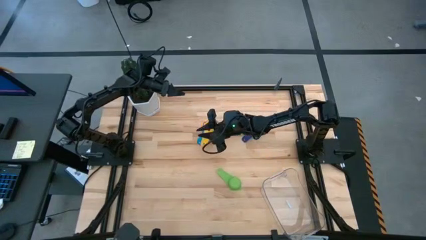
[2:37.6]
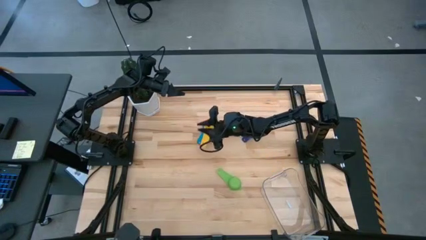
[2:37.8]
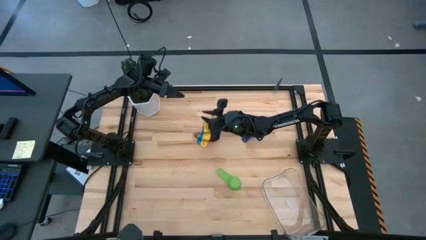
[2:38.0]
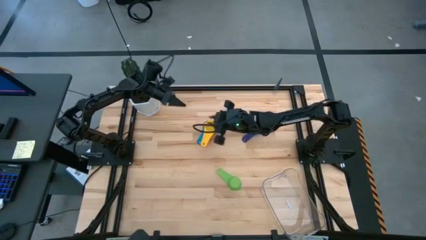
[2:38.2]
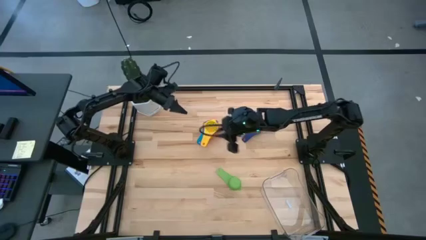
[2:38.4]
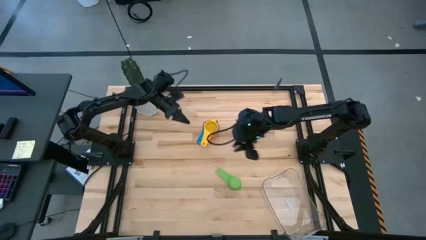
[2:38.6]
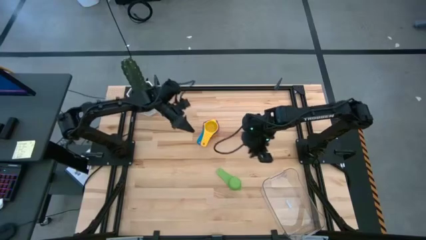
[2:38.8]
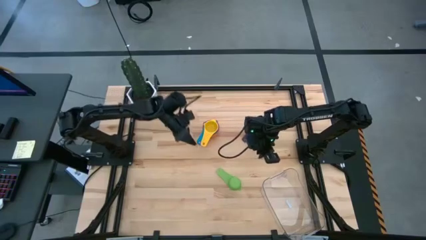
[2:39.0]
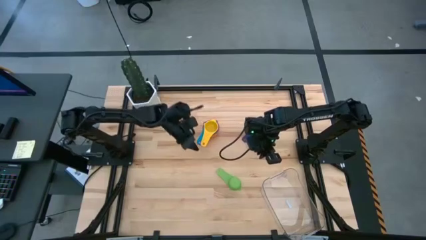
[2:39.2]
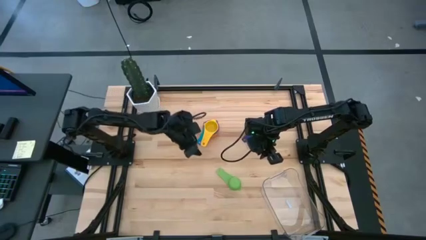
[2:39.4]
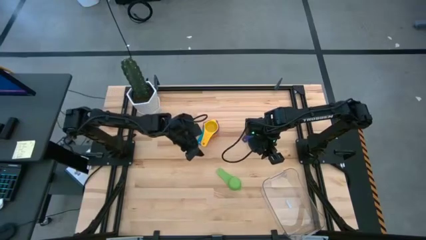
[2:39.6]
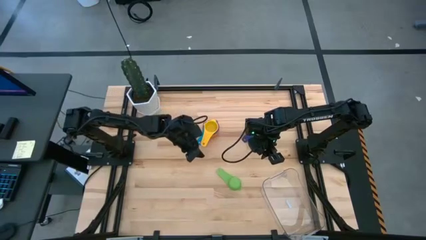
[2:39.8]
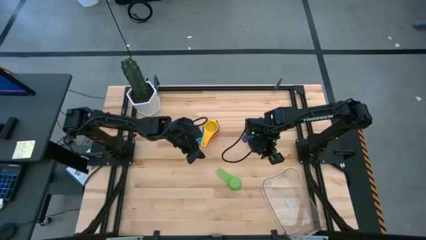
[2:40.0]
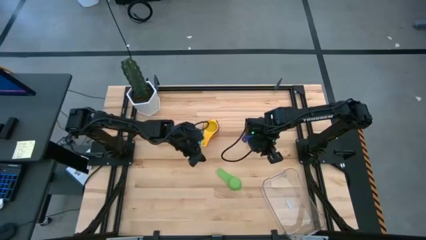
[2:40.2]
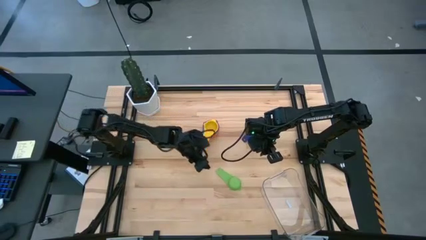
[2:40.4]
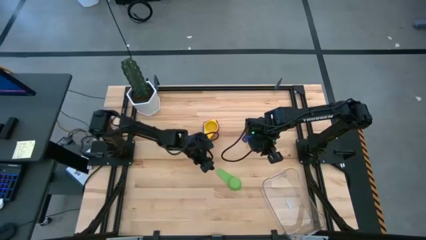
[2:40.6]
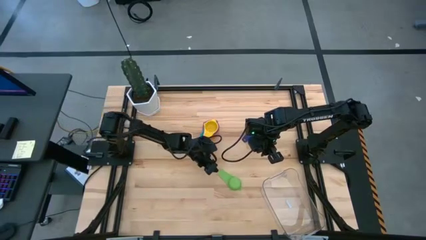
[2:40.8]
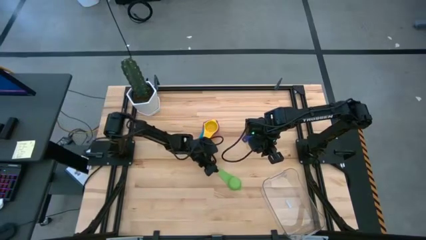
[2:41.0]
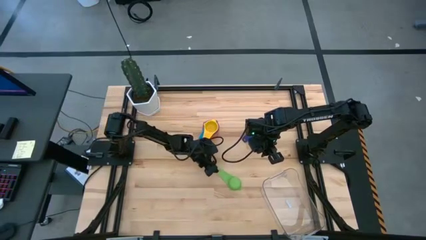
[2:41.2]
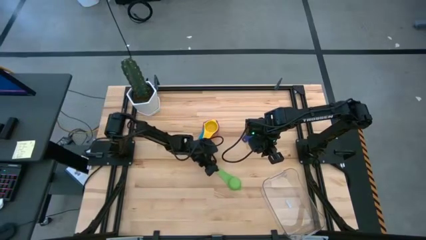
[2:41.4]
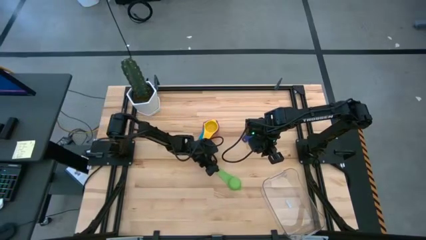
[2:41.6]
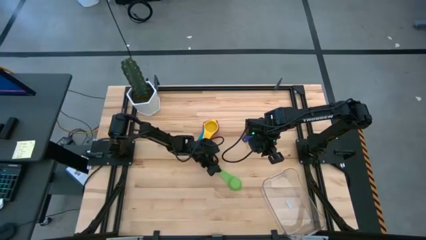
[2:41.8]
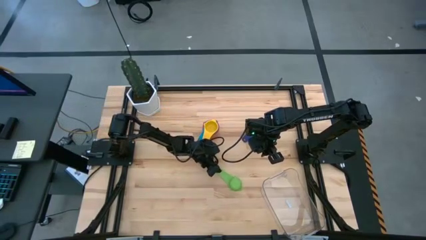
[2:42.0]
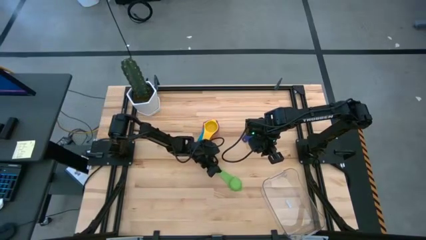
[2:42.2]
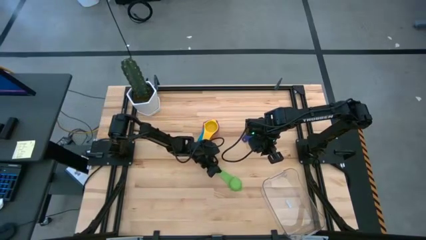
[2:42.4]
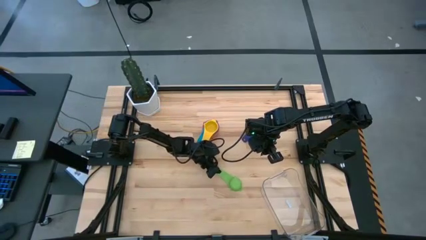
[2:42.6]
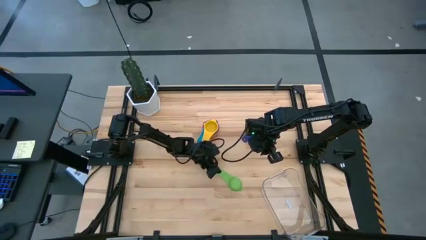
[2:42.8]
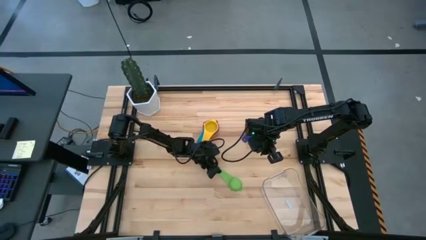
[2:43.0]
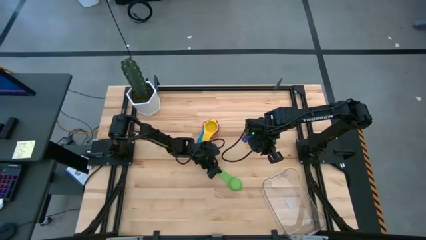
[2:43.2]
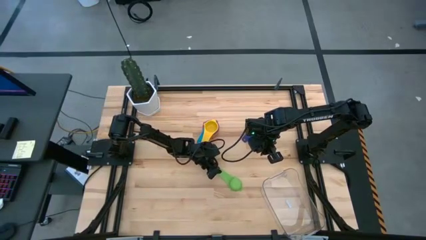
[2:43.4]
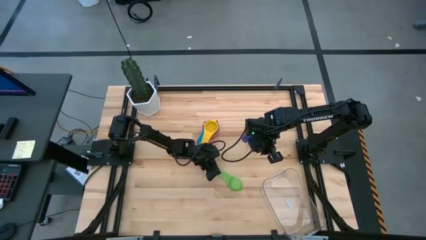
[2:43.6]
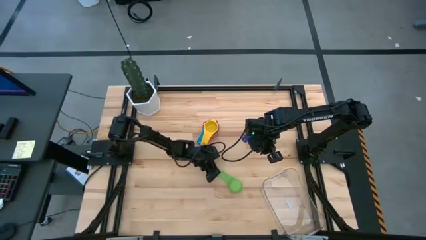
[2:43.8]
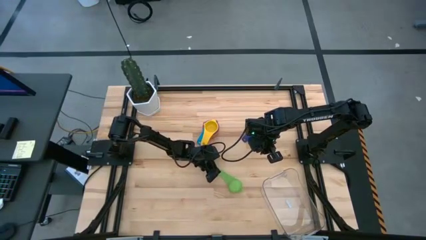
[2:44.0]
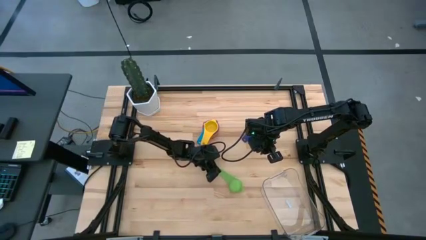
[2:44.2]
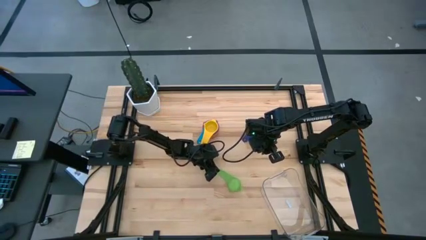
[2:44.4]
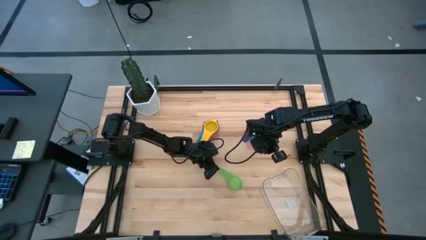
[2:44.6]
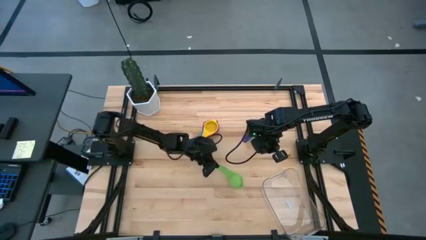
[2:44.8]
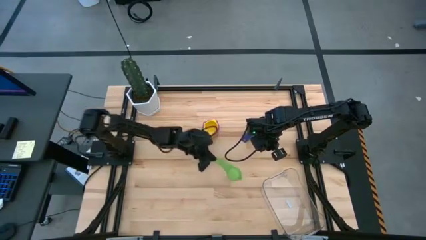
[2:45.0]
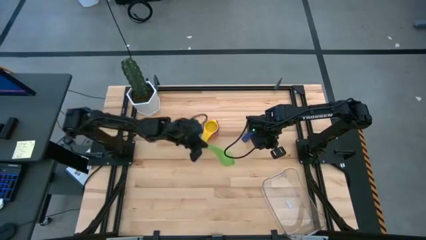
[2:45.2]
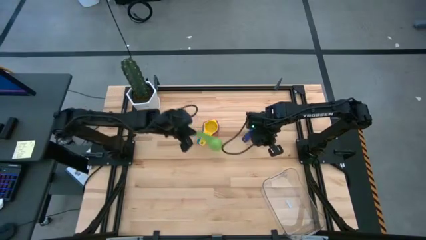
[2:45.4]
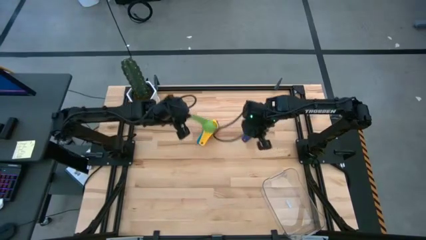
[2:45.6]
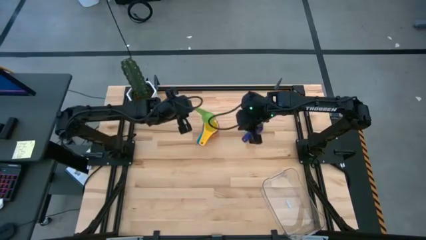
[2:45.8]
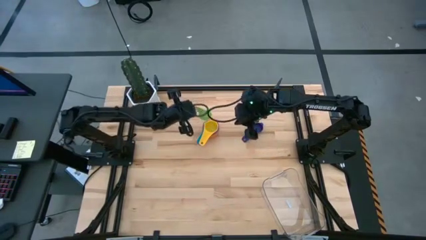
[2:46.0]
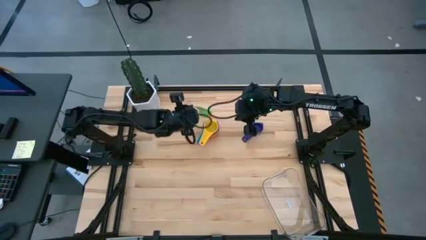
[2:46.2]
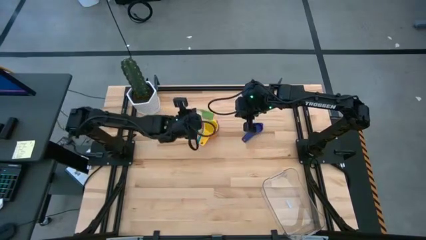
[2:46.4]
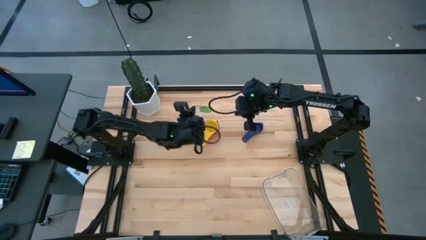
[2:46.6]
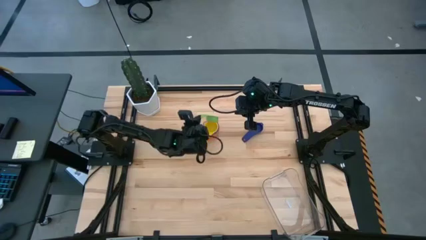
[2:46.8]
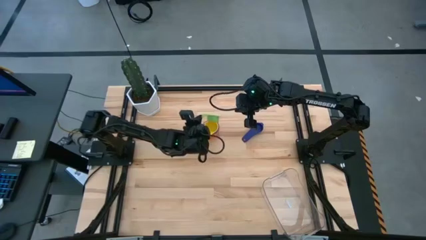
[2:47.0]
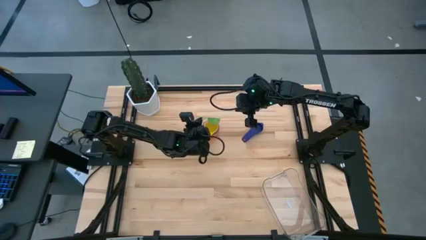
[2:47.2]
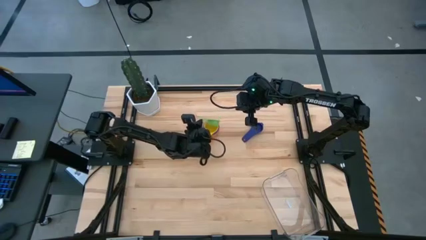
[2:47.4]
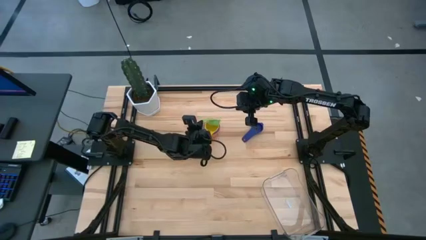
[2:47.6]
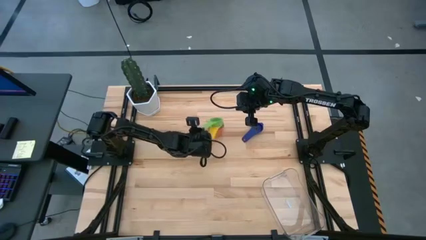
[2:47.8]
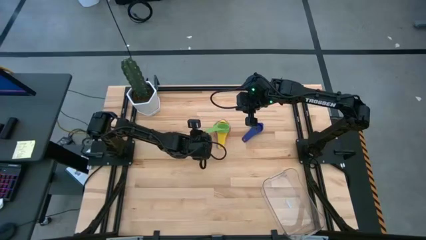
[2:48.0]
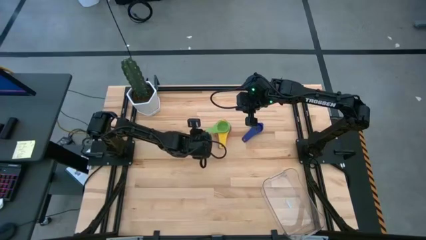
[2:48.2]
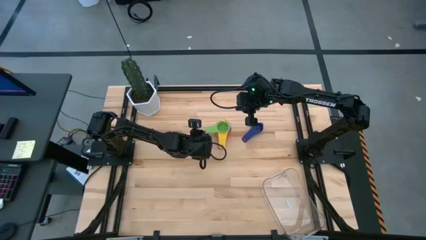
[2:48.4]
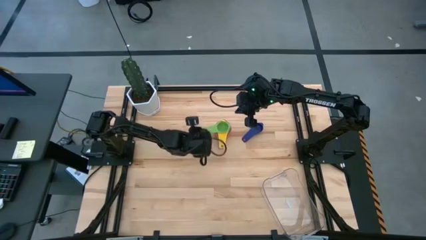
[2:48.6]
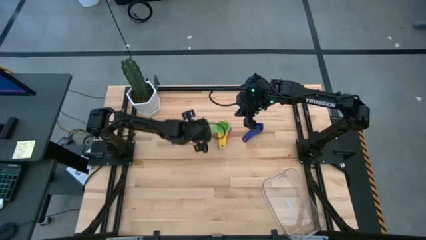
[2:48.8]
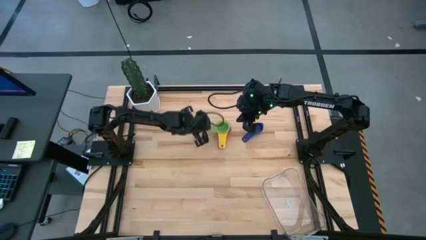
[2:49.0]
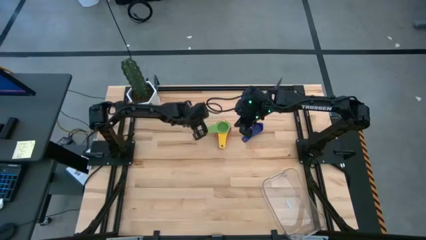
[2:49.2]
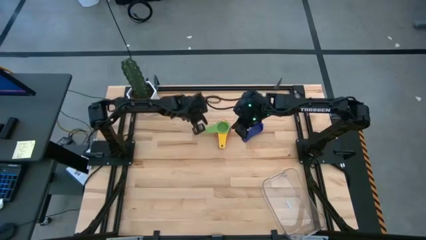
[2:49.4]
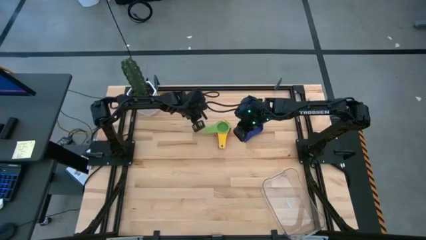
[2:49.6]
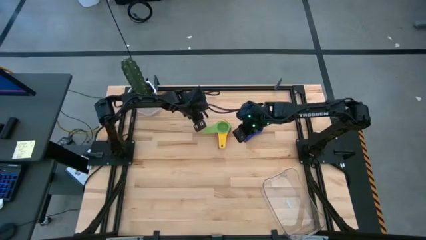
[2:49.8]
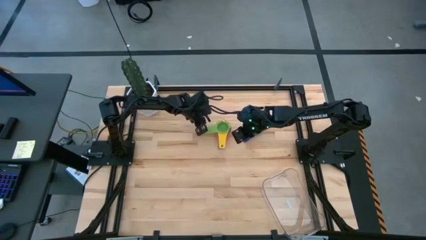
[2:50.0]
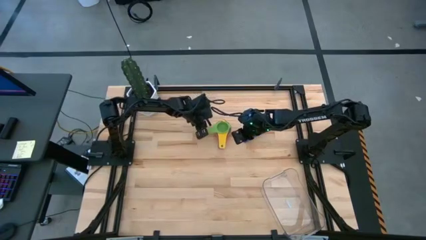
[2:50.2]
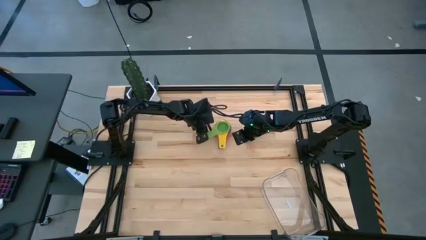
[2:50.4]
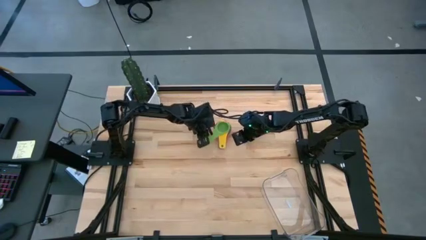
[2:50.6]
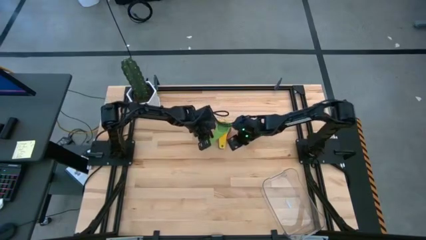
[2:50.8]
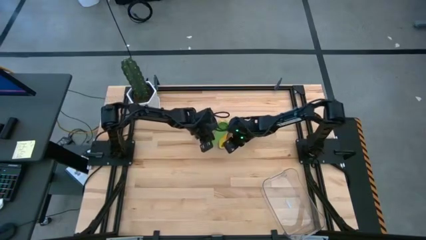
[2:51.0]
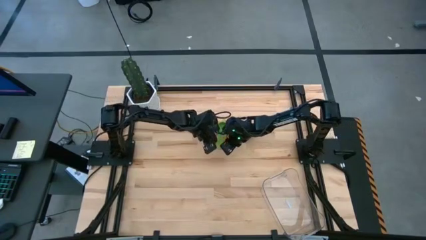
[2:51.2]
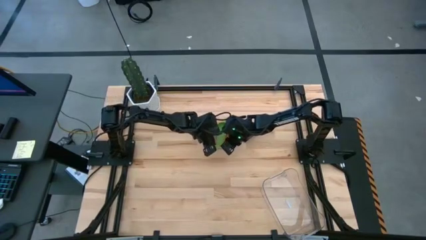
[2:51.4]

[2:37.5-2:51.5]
Task: Nest measuring cups in basket
Stack the green measuring cup on top of the yellow measuring cup
